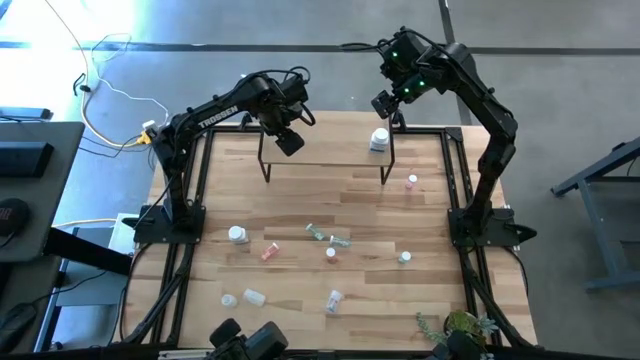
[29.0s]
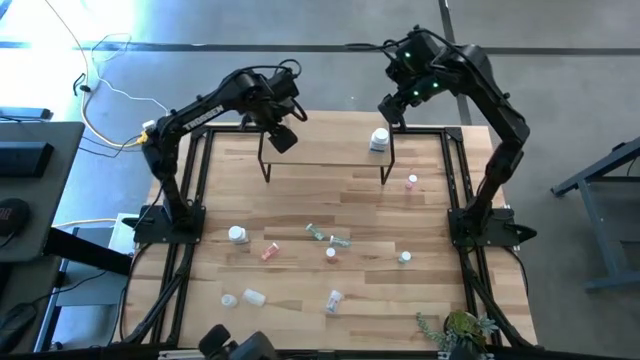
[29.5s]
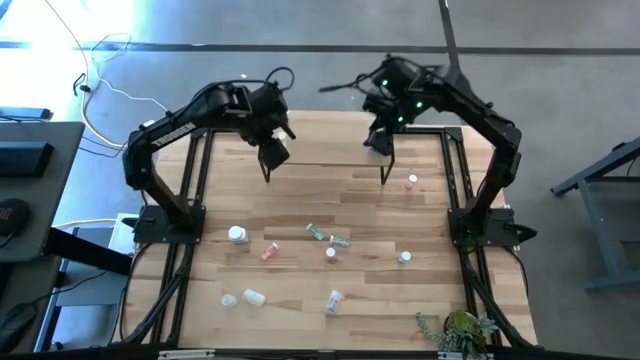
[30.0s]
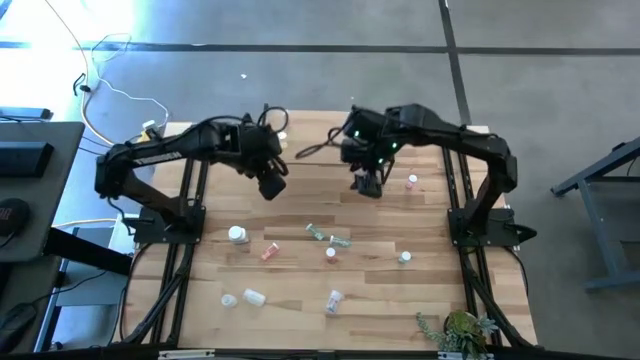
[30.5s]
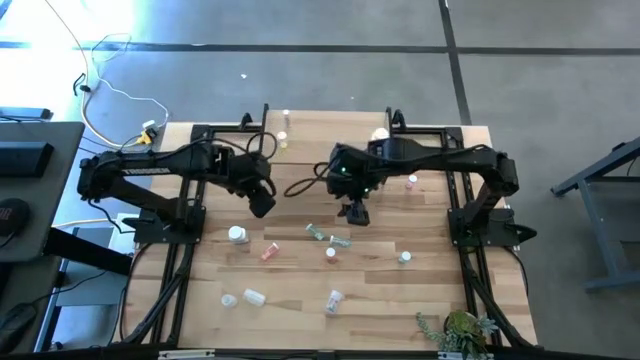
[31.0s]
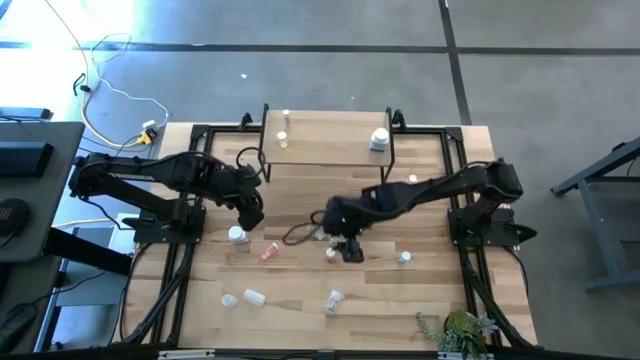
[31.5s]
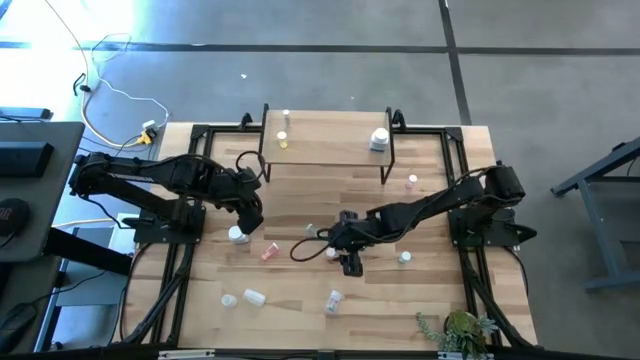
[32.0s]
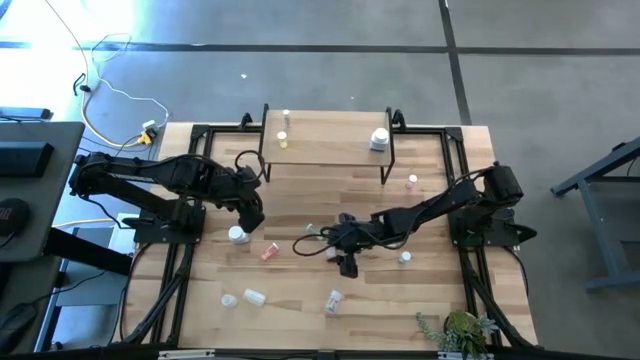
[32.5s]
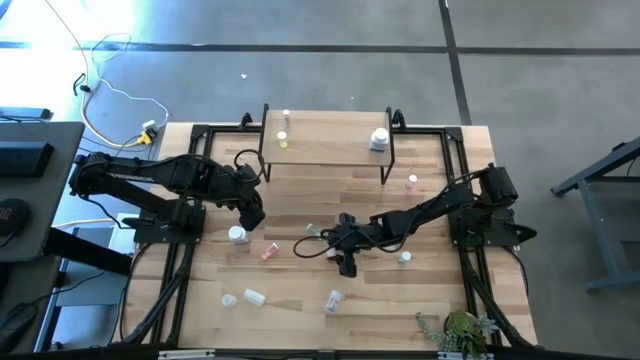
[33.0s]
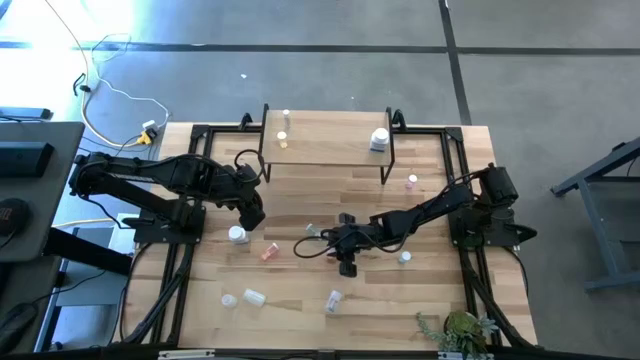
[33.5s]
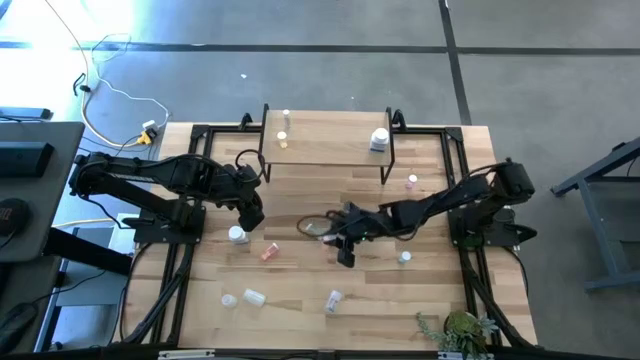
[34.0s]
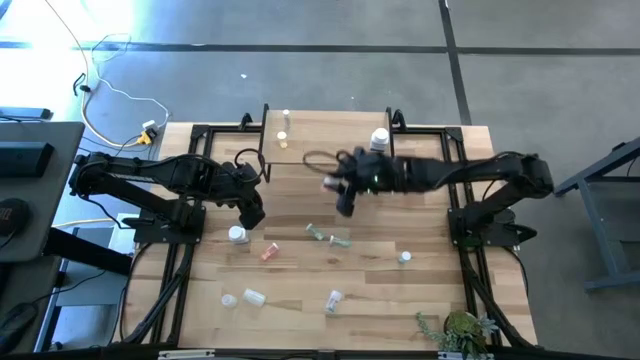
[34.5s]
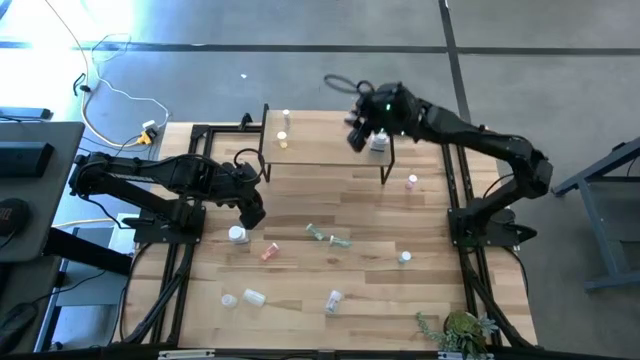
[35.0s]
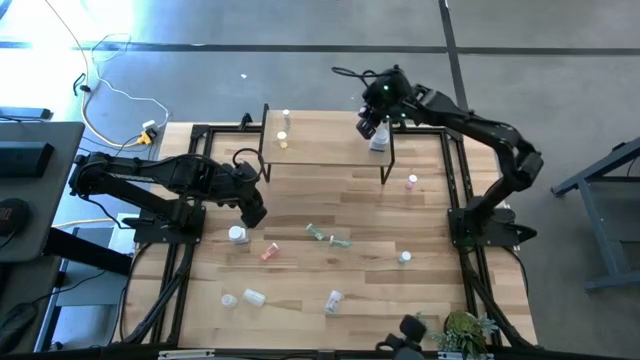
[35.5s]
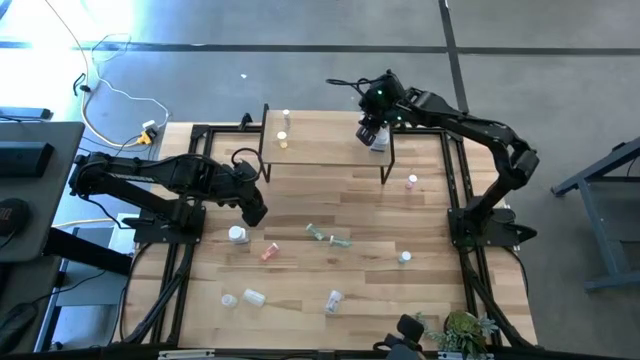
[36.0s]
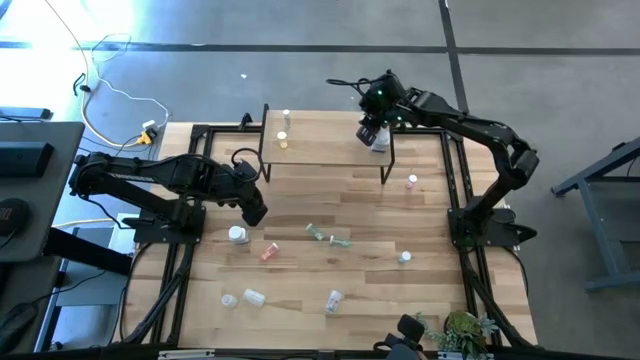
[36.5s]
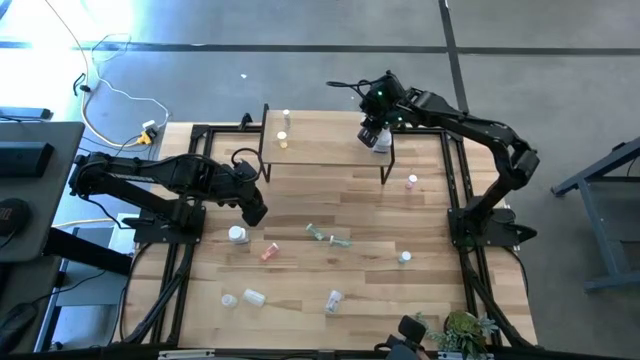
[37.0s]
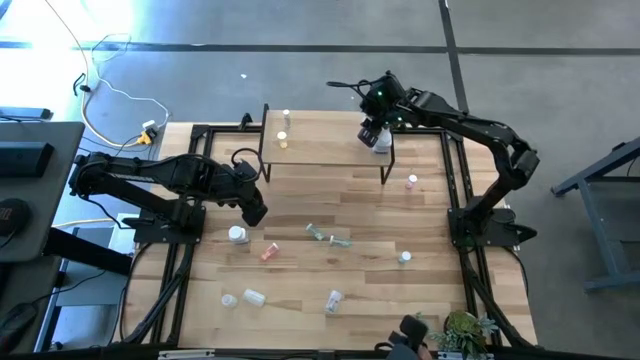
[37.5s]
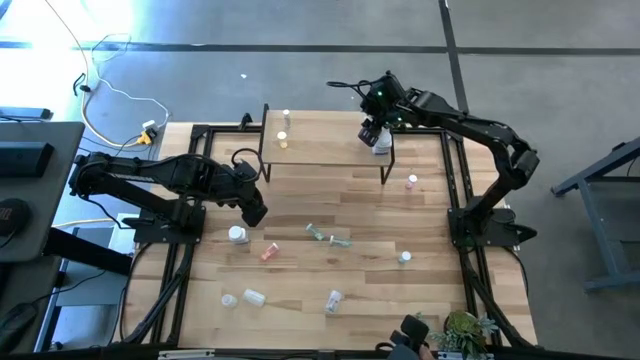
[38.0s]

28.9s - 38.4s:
Task: Pick and place medicine bottles onto shelf by color
Put the right pink pill bottle on the shelf

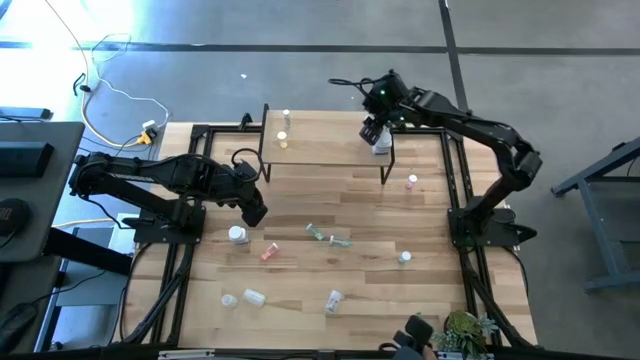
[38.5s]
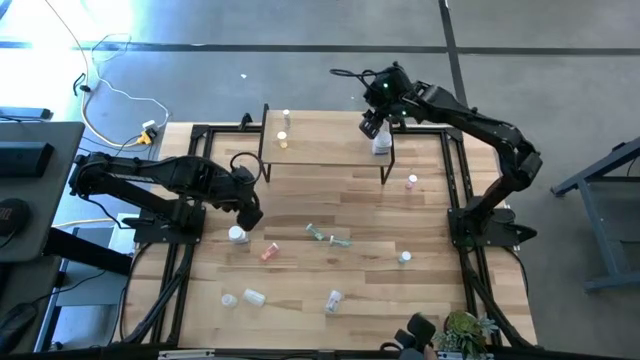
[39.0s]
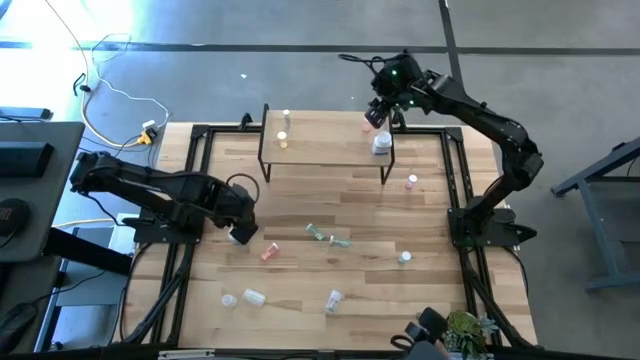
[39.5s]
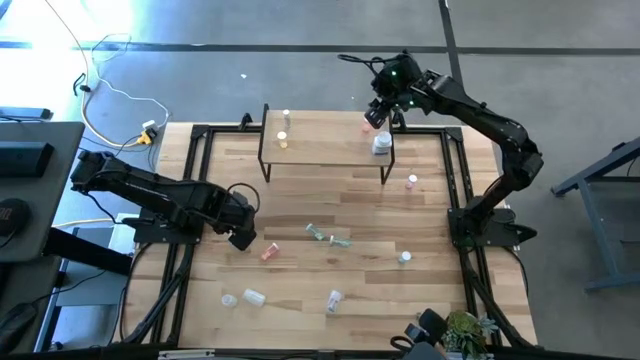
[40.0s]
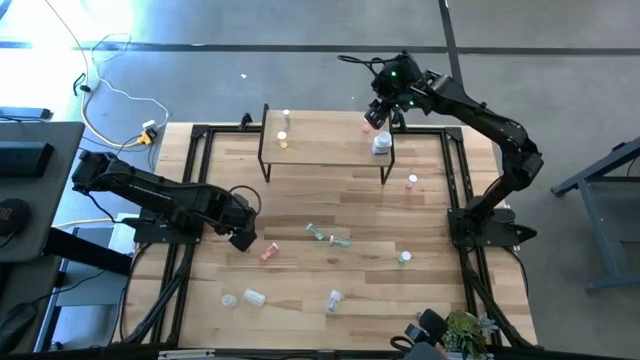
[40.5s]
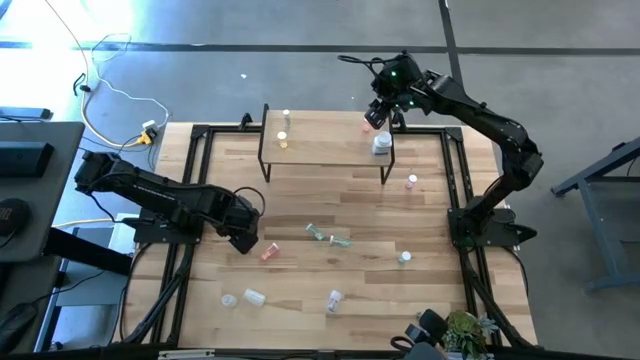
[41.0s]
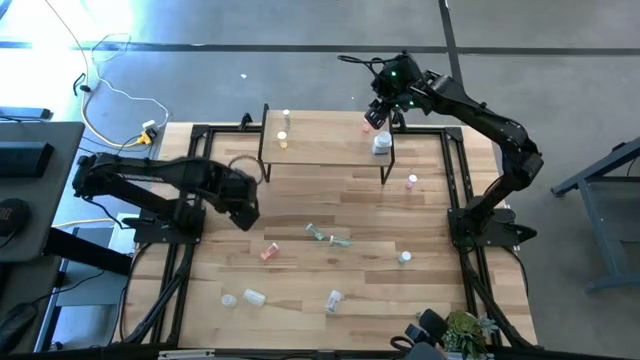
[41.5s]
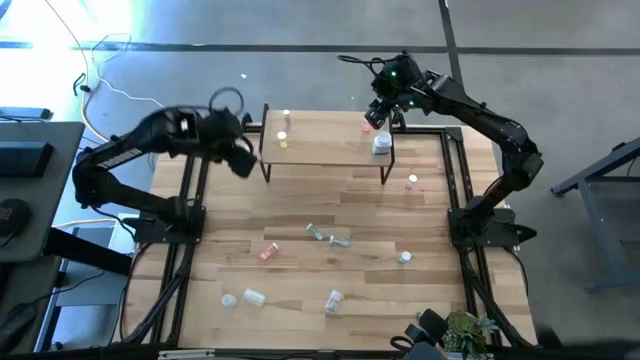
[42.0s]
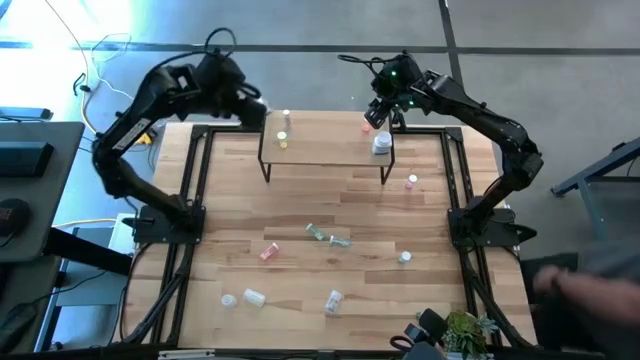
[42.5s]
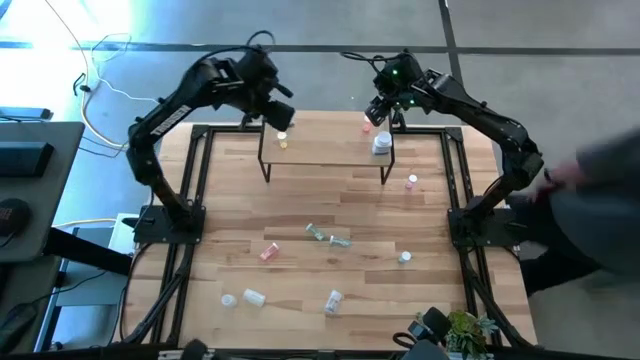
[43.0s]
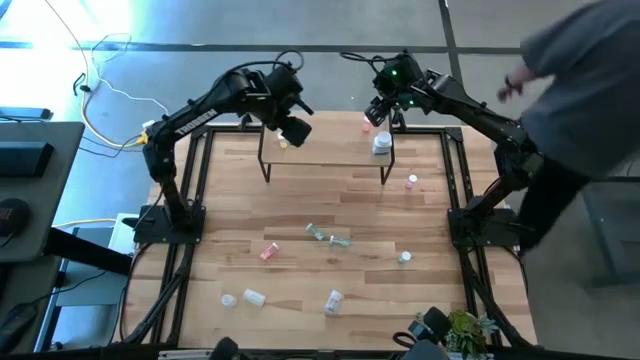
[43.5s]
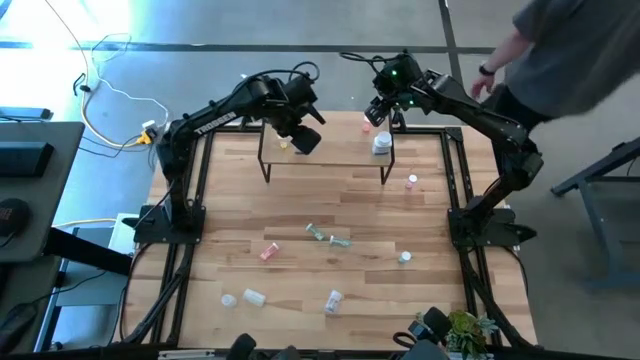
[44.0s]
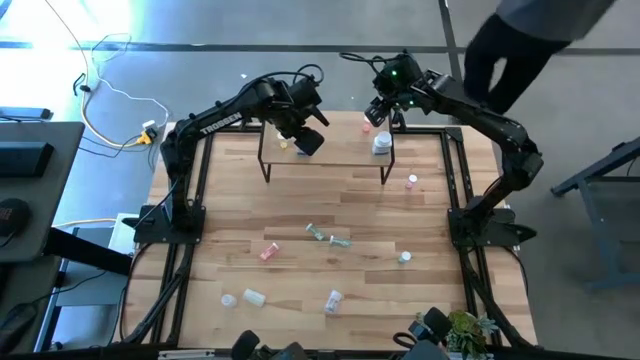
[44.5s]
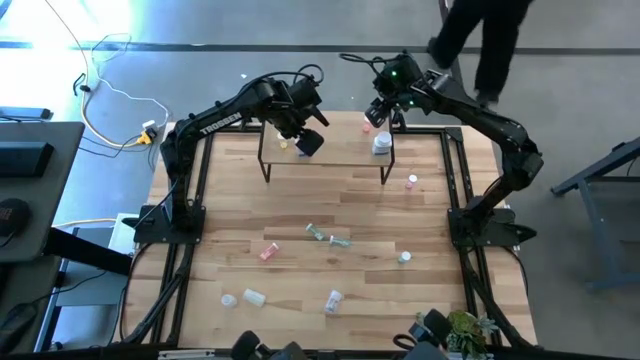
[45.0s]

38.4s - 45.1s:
Put the white pill bottle on the shelf

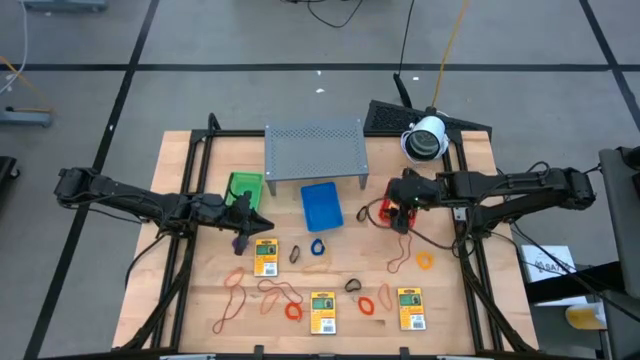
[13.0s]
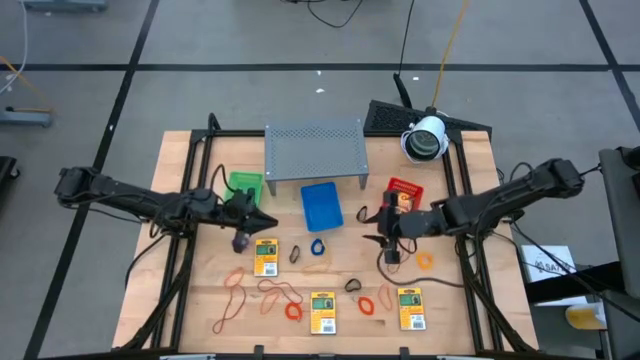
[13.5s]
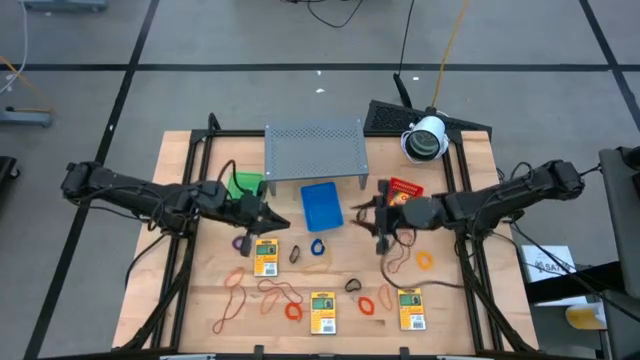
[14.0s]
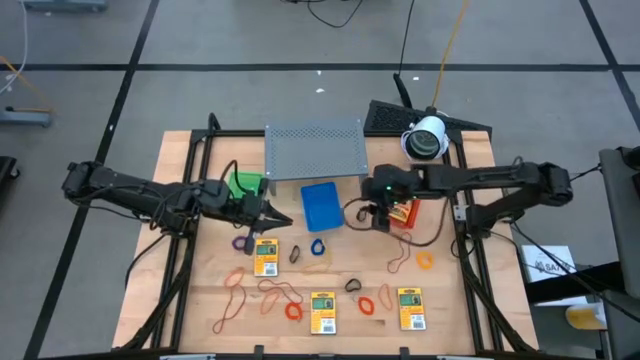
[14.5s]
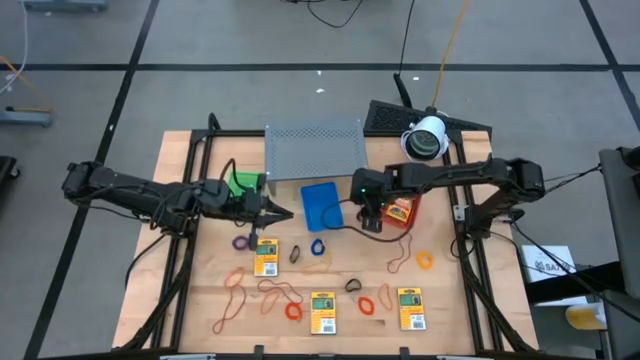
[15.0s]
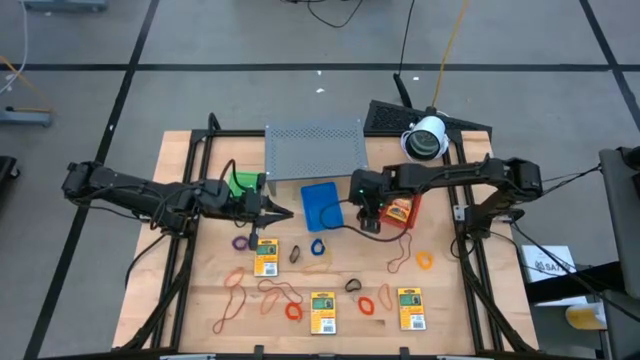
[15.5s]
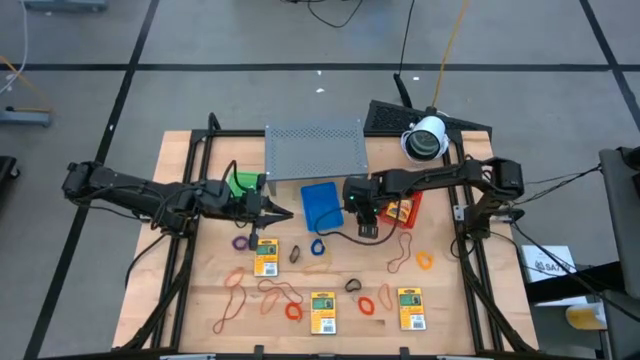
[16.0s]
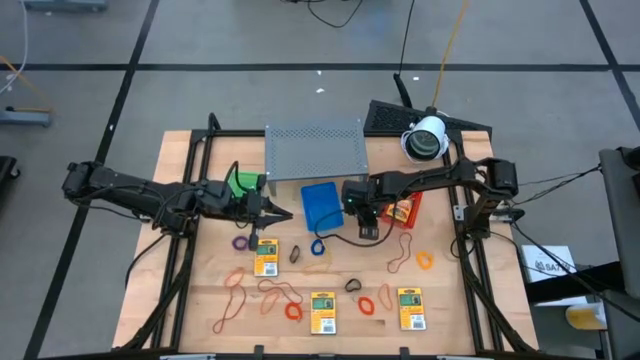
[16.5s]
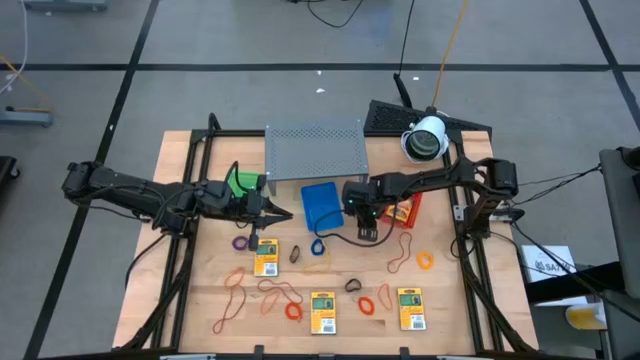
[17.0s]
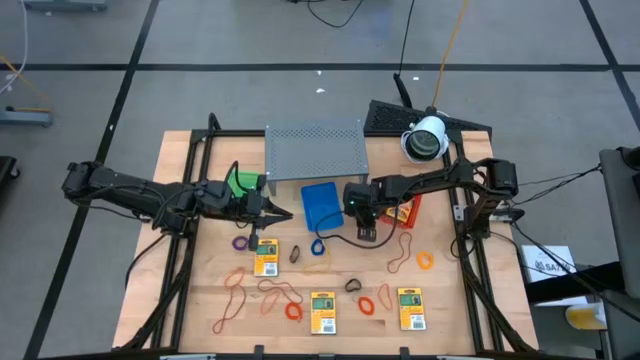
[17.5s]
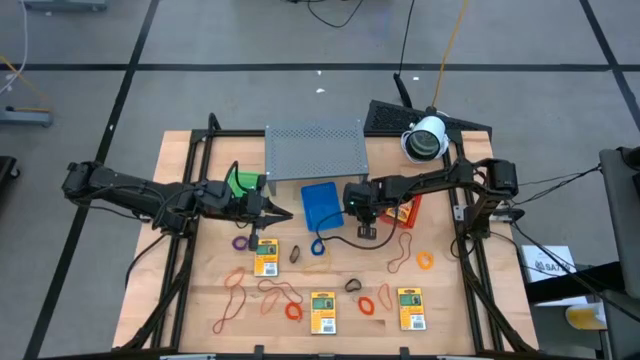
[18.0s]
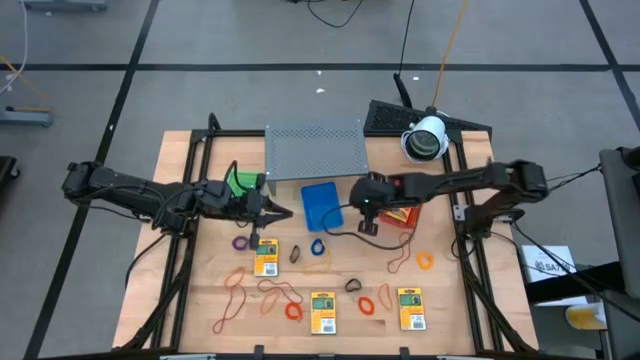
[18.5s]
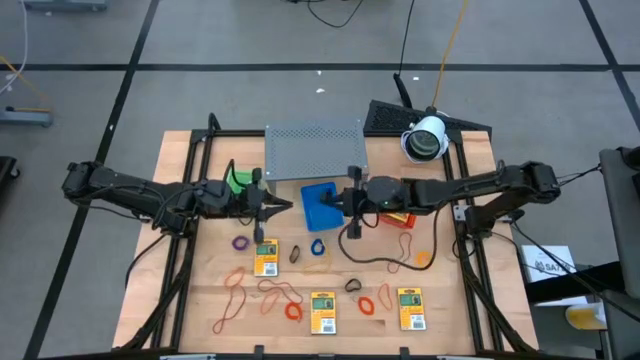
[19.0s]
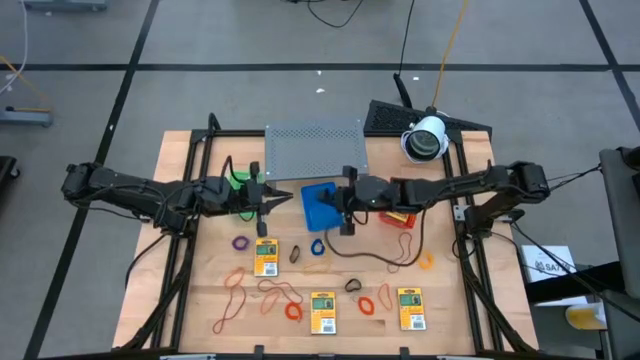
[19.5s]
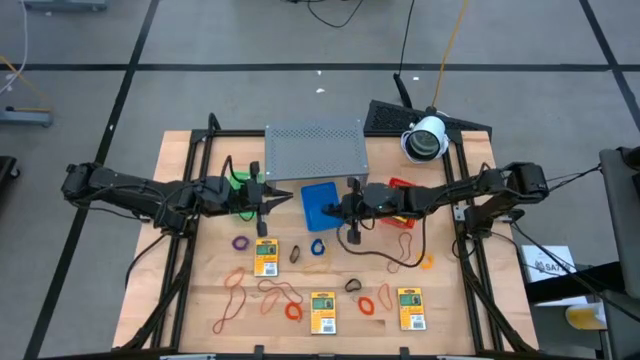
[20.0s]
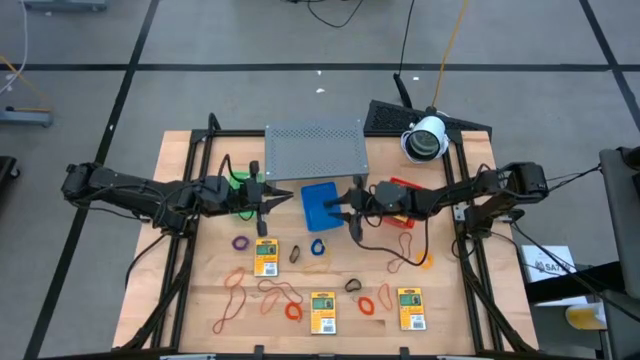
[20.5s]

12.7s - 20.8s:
Task: Pick & Place Office Desk Supplies
Put the black rubber band into the blue bin
